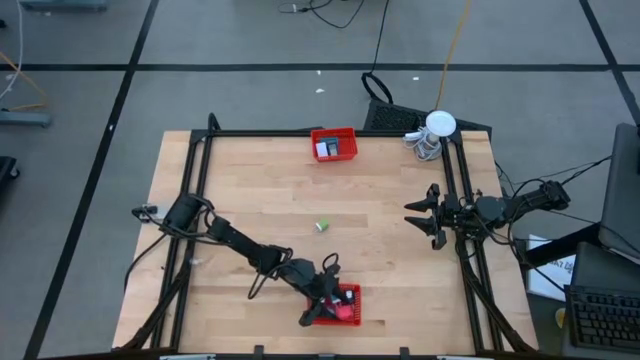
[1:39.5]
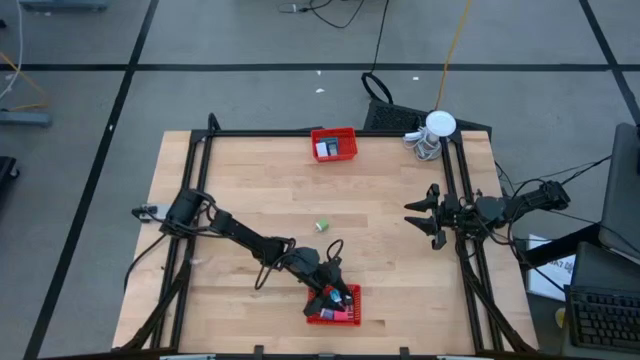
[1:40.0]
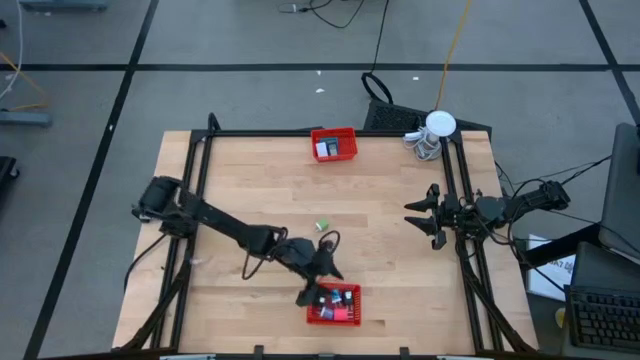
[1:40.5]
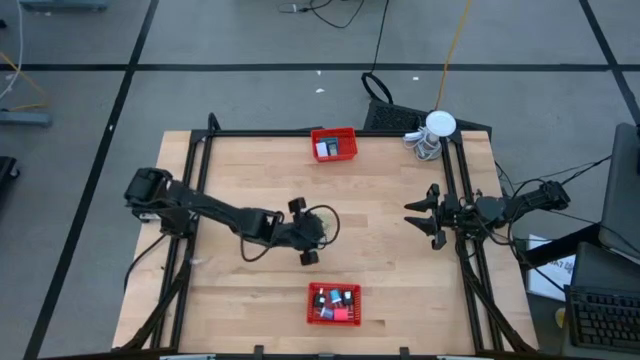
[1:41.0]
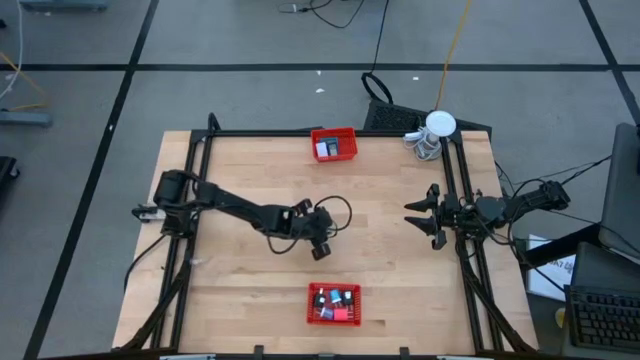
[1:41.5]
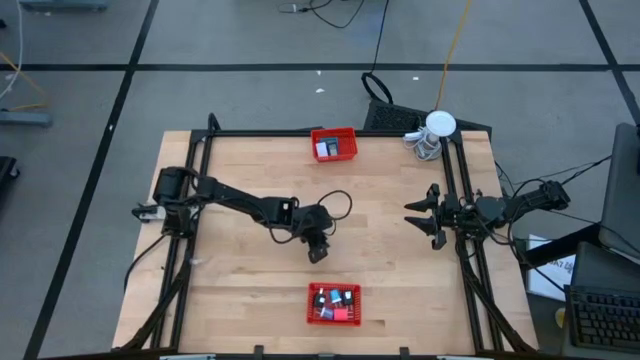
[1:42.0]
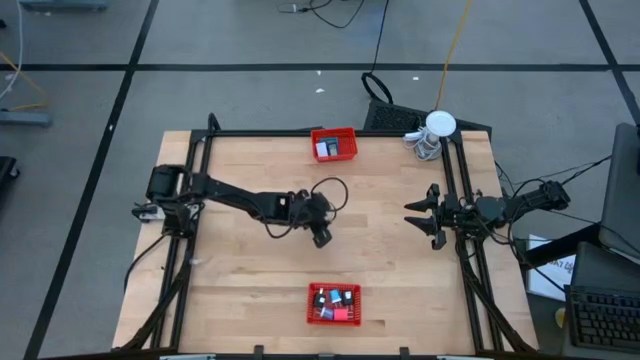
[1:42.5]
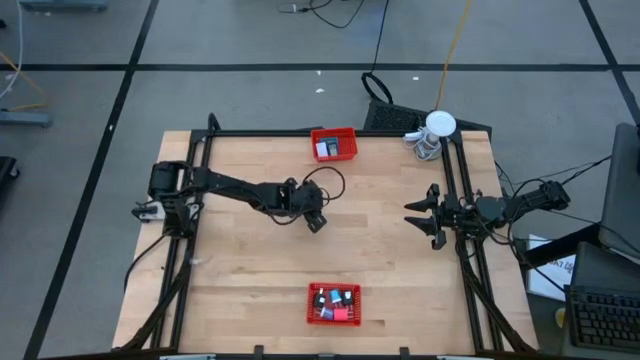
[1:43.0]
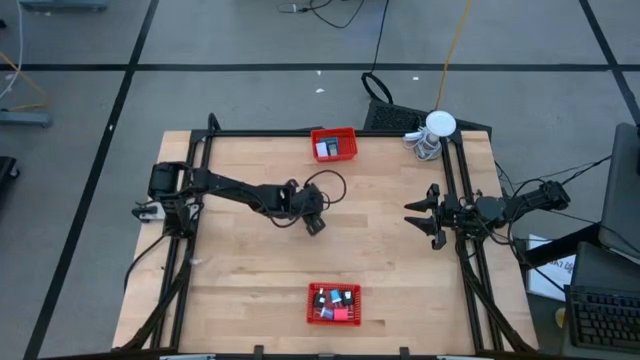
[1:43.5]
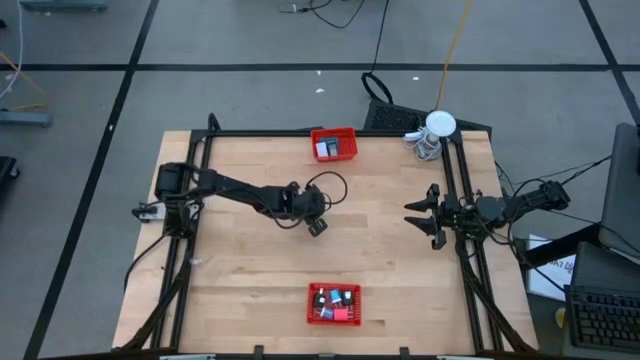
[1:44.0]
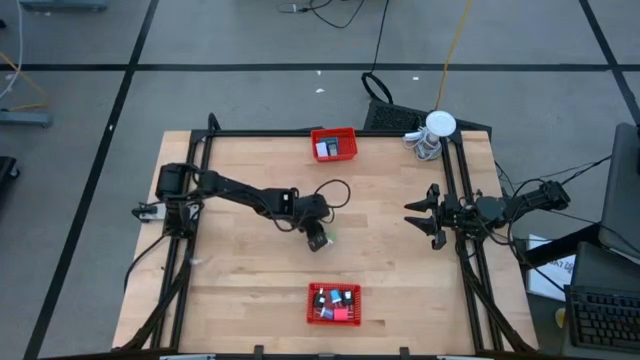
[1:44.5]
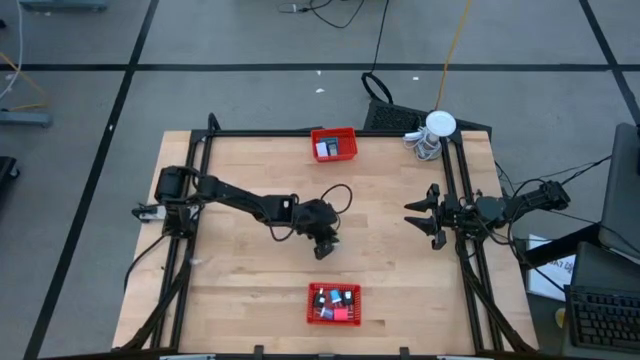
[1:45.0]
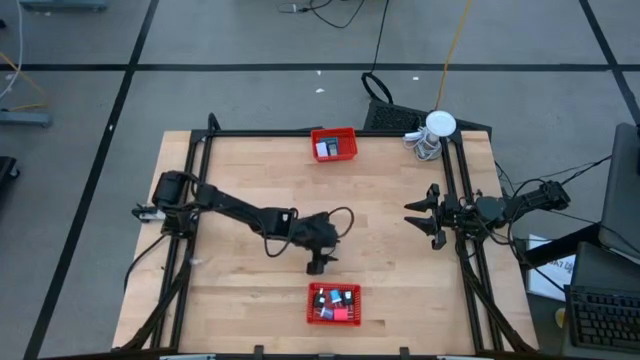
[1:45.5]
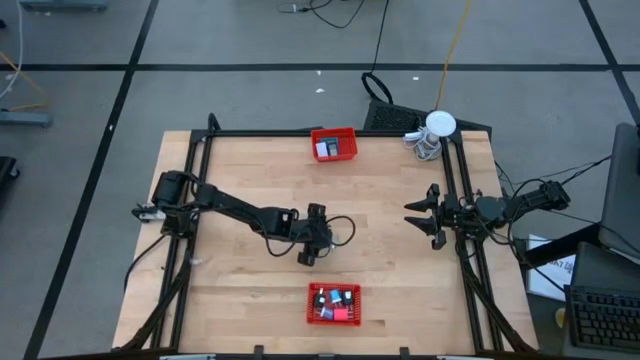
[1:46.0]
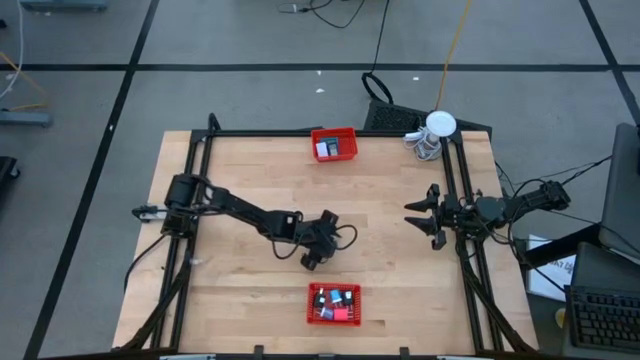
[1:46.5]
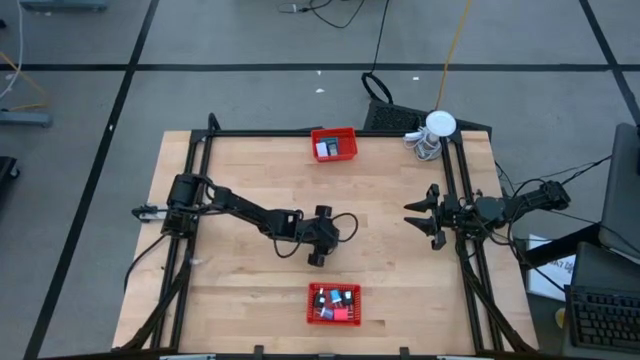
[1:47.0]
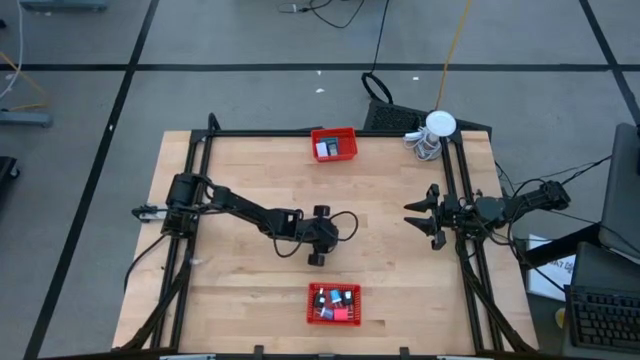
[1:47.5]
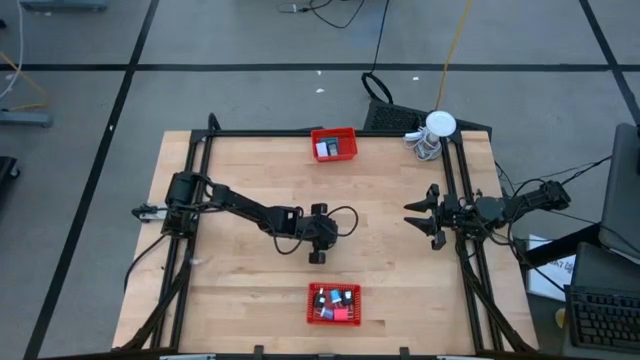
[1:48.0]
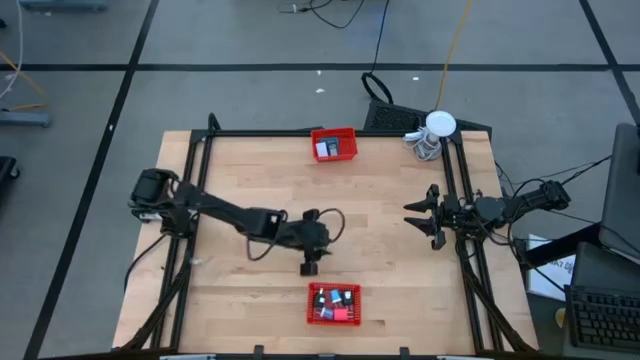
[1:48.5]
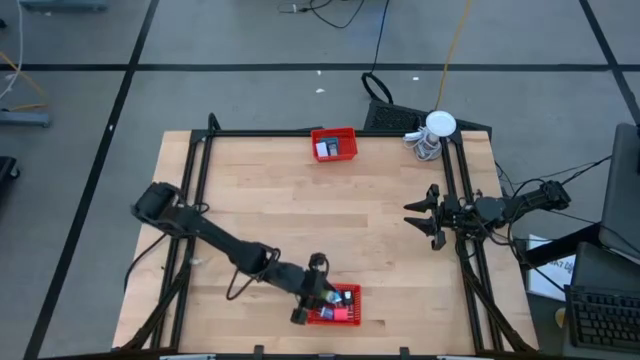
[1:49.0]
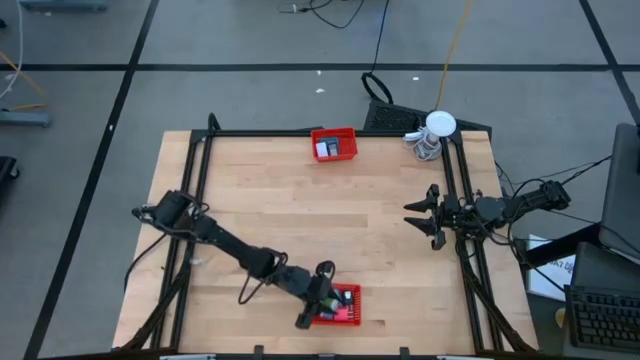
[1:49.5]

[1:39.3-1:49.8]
Task: Pick & Place Office items
Put the green charger adapter into the bottom orange bin

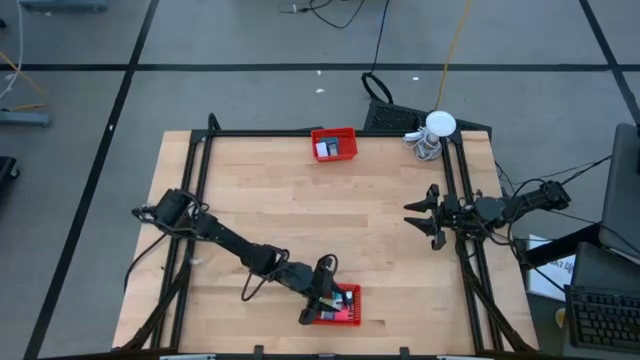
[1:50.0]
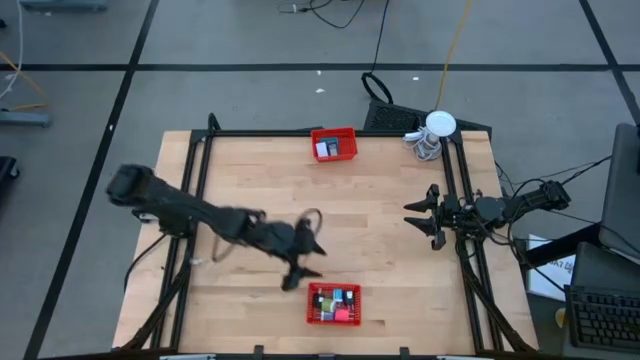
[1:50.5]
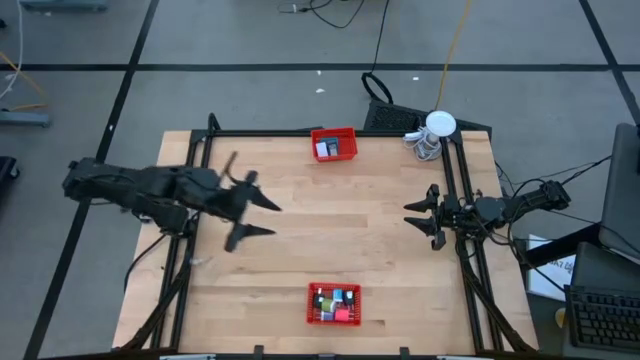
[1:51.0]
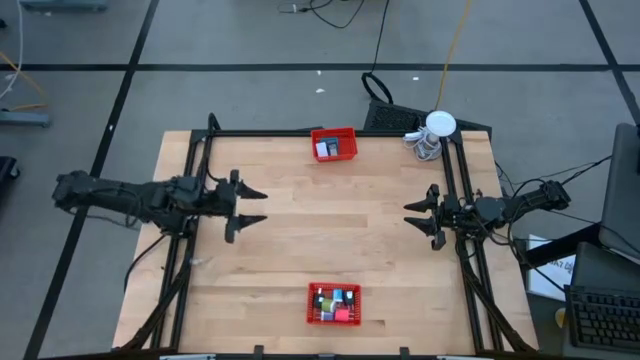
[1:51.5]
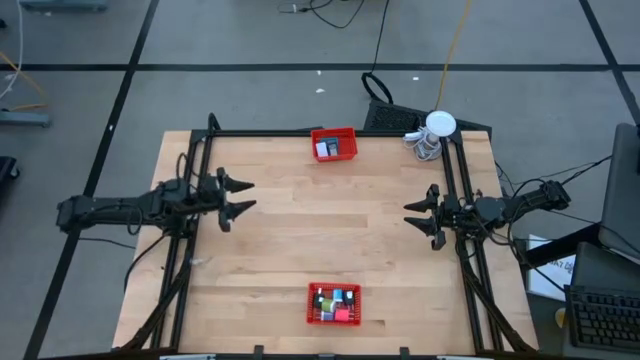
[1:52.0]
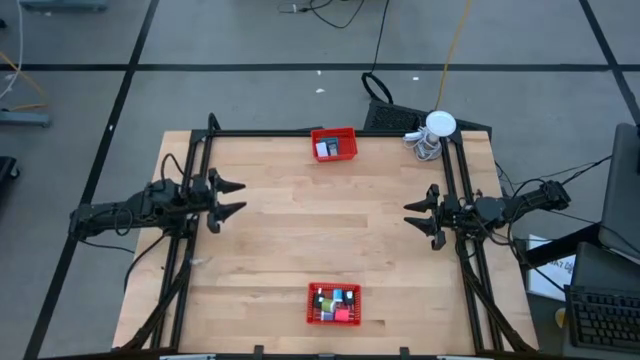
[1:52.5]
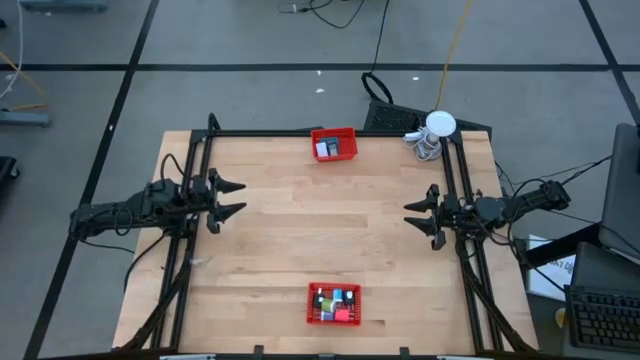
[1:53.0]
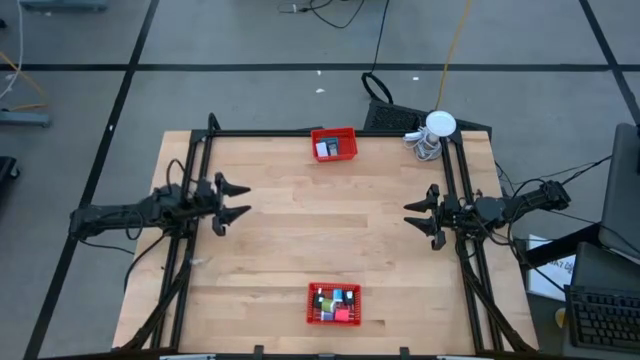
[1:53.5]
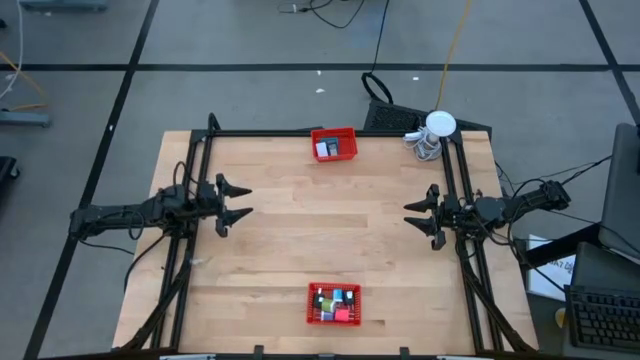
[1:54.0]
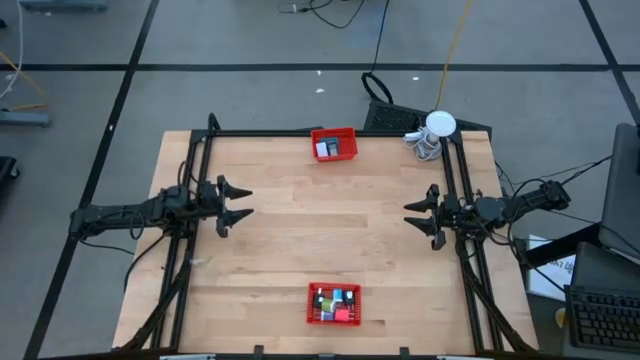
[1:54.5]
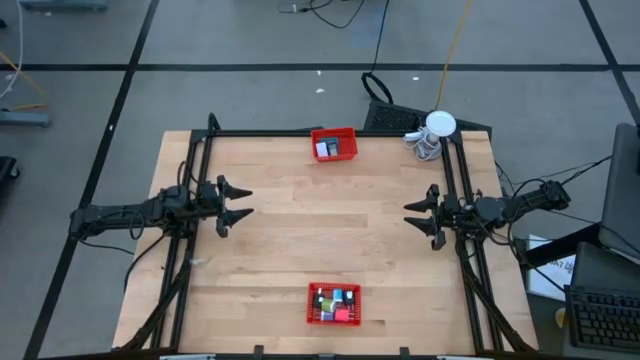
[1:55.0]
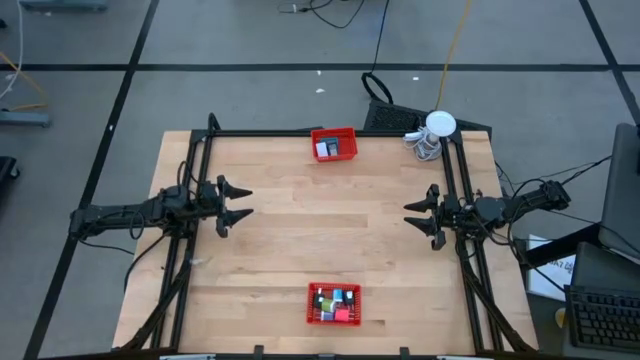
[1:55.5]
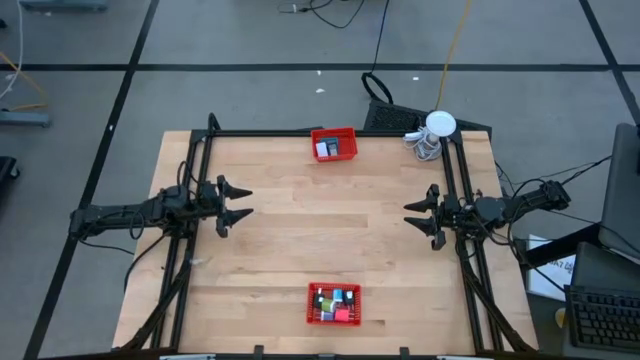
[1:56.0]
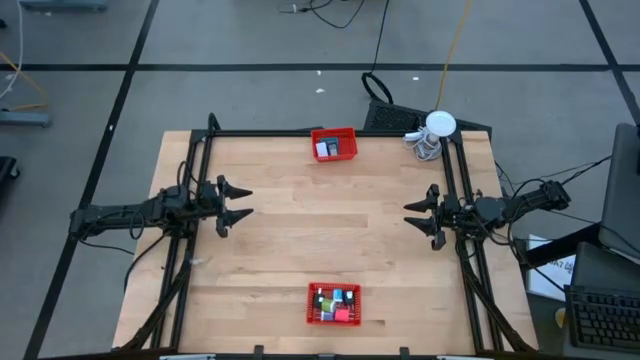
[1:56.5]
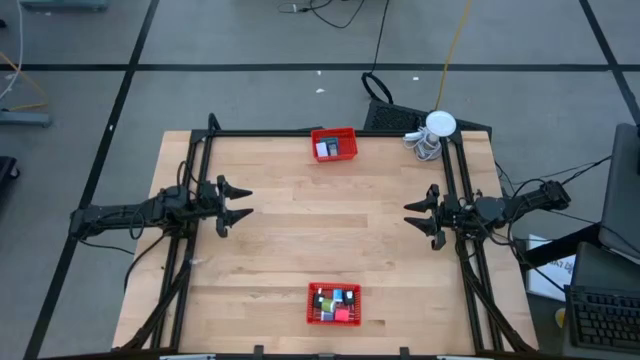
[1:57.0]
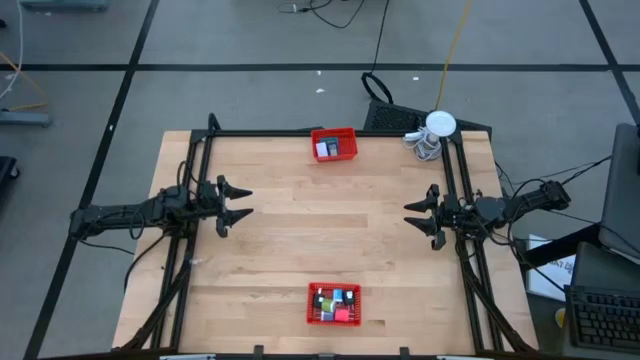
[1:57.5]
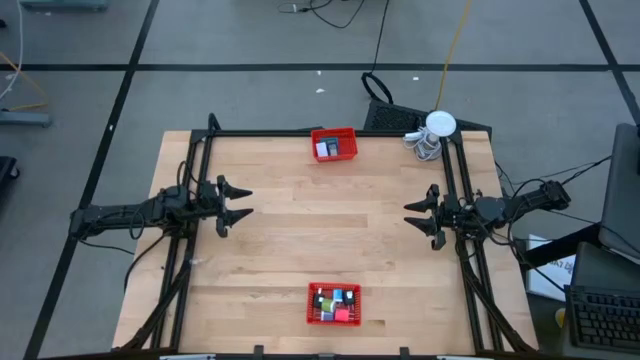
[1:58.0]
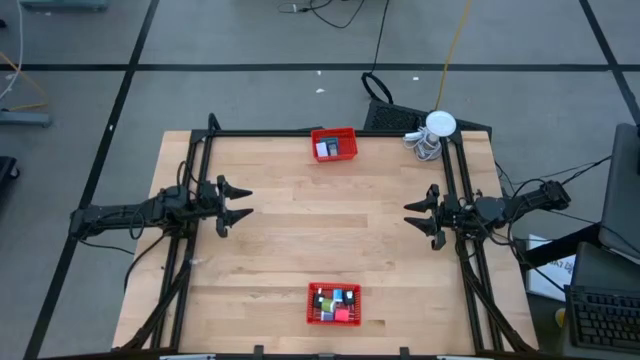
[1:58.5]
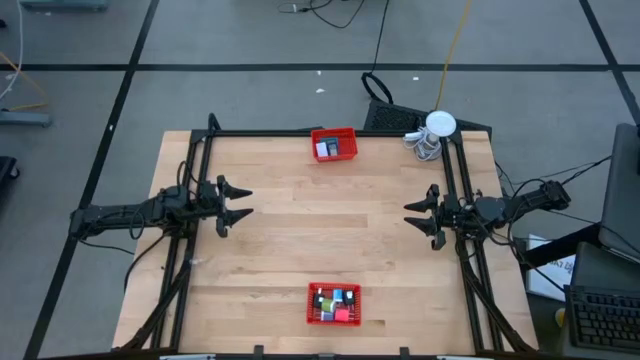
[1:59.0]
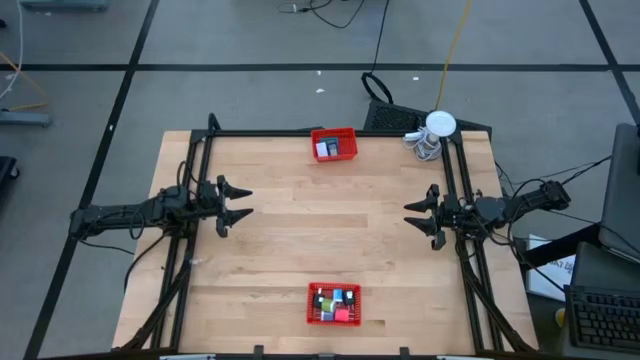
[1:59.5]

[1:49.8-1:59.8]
Return to Home Position

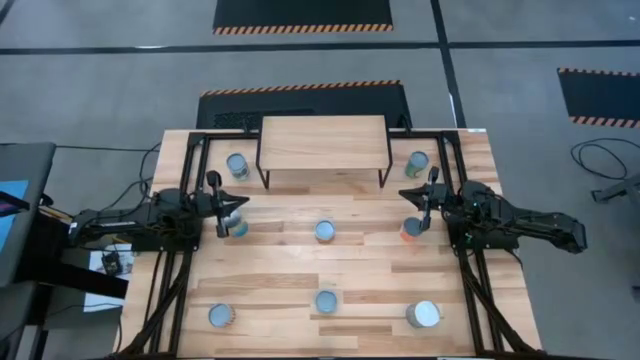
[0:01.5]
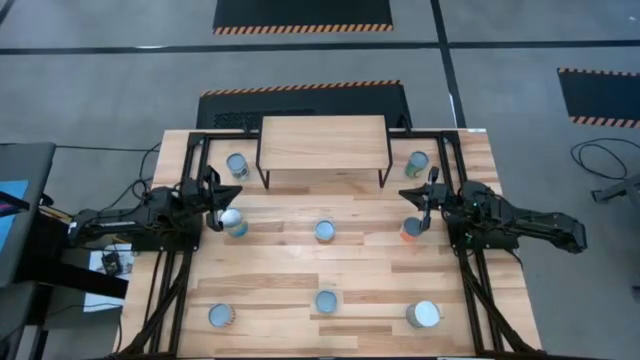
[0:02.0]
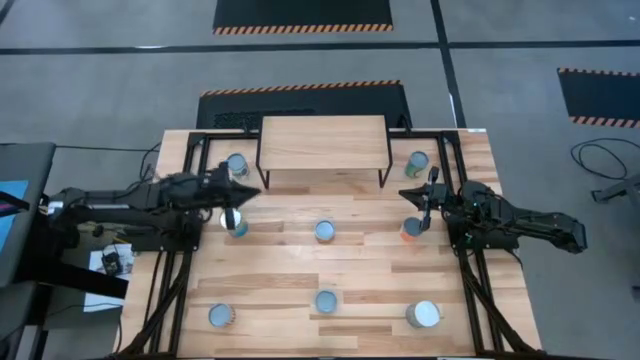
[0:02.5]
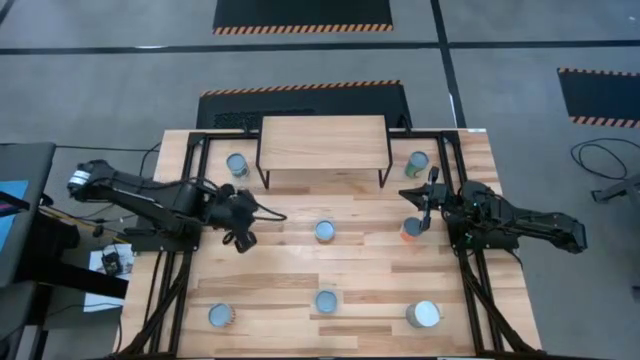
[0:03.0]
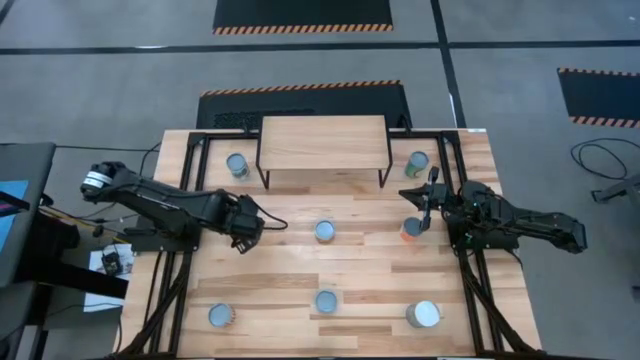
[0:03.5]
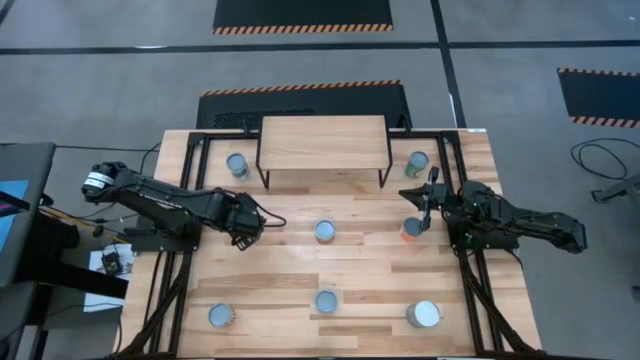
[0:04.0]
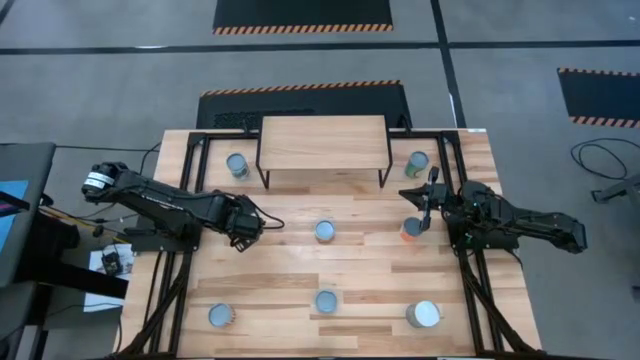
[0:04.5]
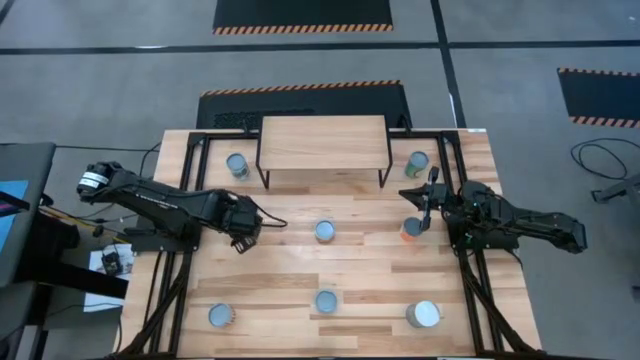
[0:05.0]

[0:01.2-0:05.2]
Task: Pick and place cans onto a shelf
Put the top canned cherries on the shelf
